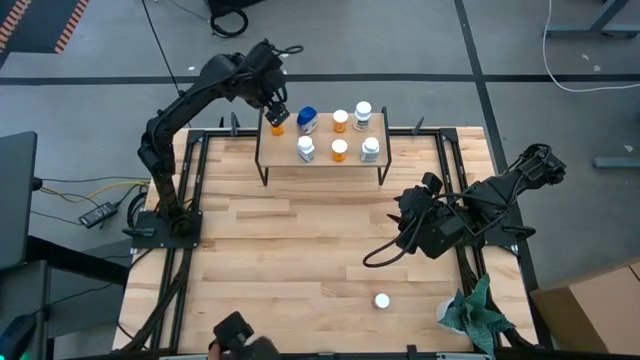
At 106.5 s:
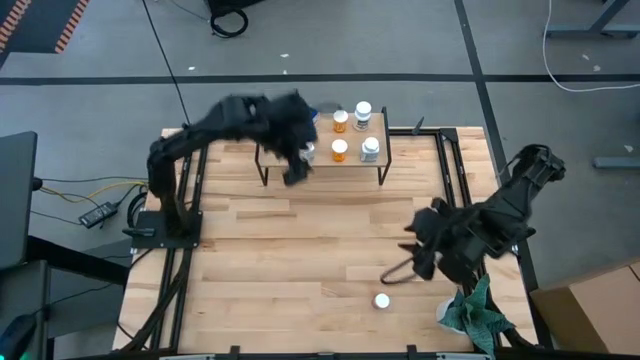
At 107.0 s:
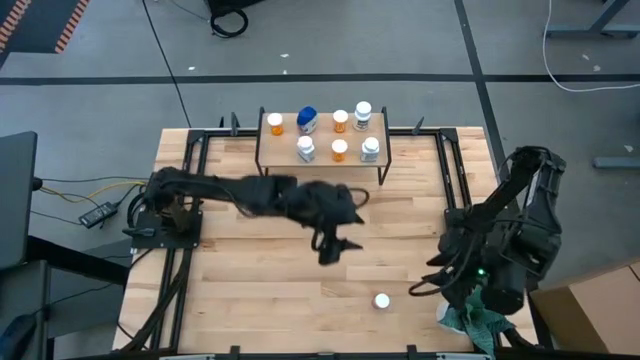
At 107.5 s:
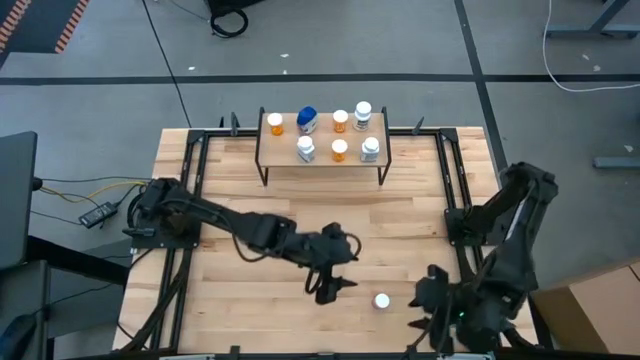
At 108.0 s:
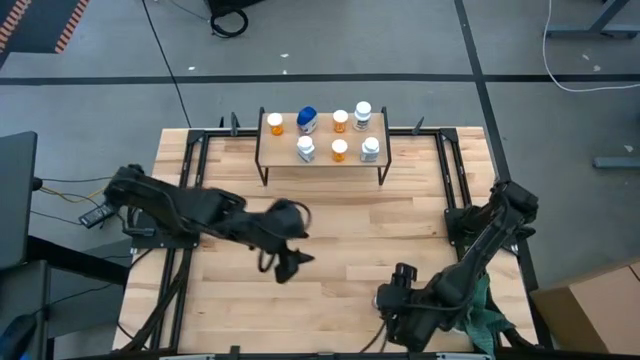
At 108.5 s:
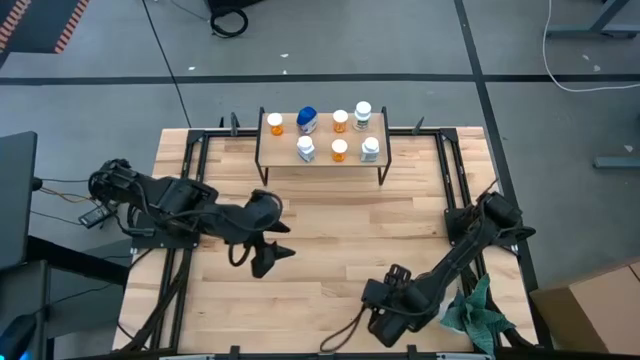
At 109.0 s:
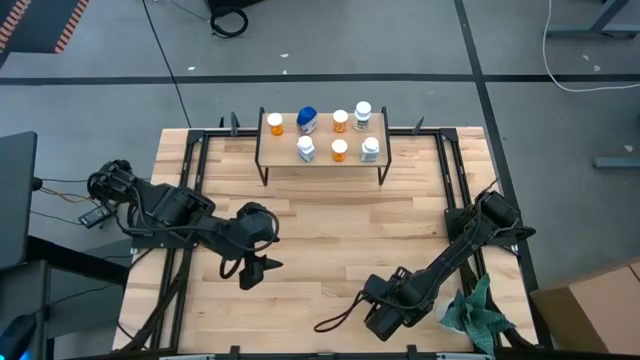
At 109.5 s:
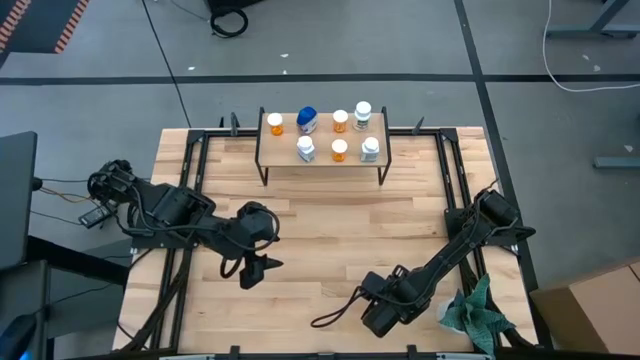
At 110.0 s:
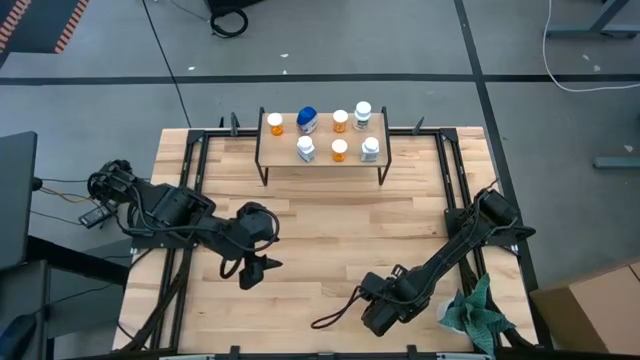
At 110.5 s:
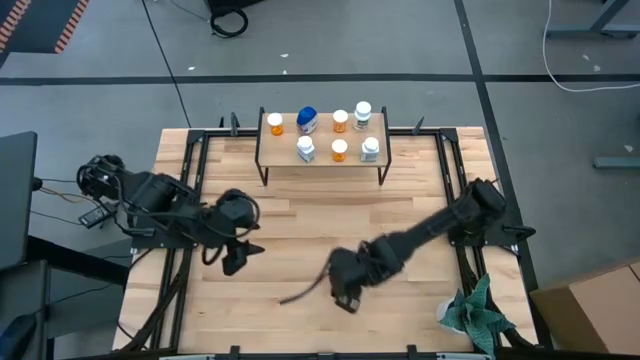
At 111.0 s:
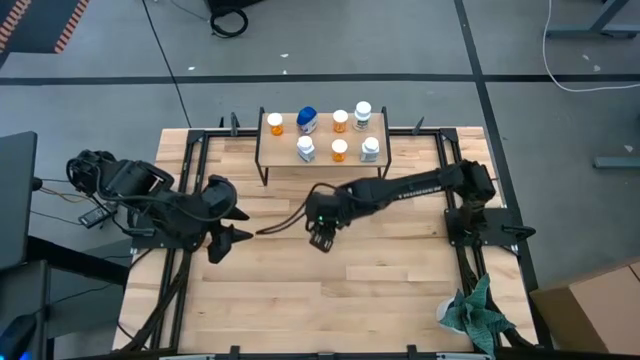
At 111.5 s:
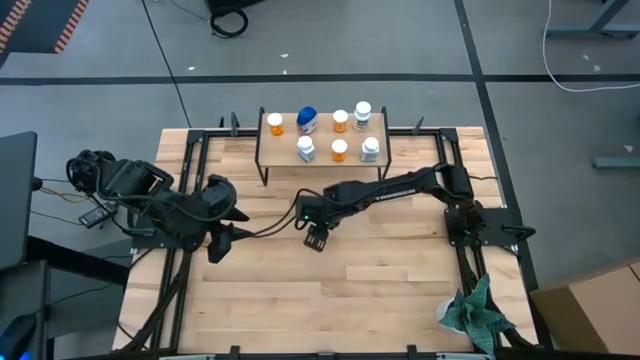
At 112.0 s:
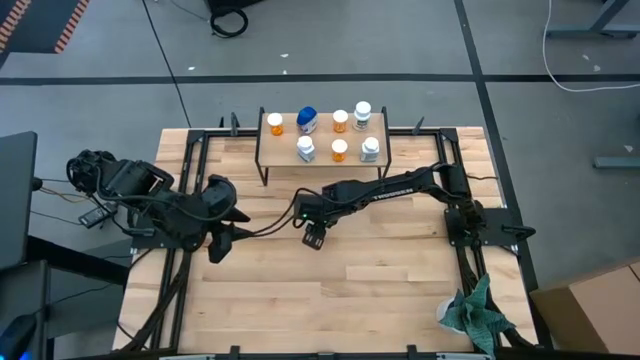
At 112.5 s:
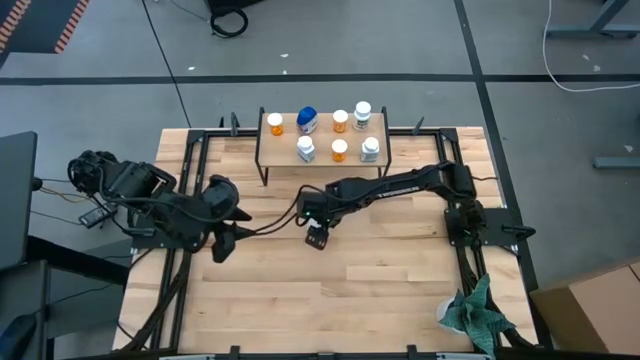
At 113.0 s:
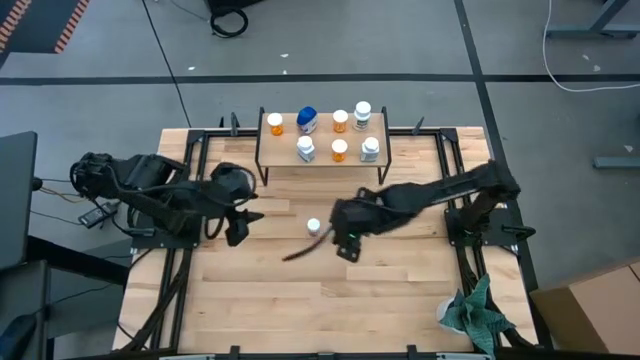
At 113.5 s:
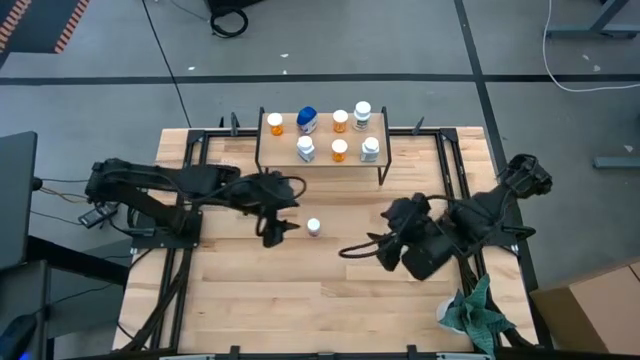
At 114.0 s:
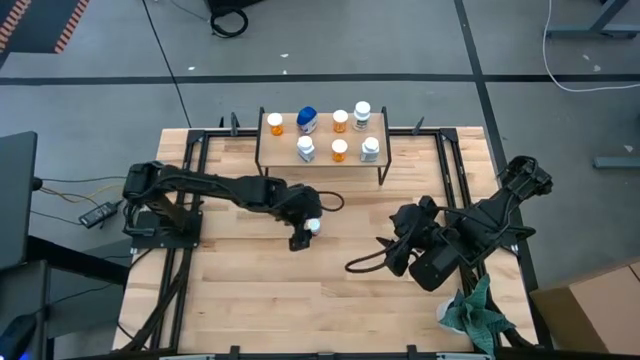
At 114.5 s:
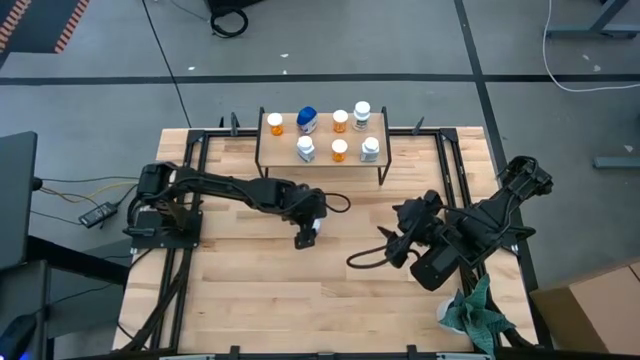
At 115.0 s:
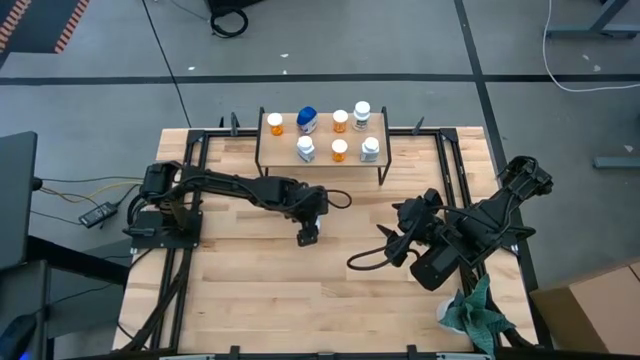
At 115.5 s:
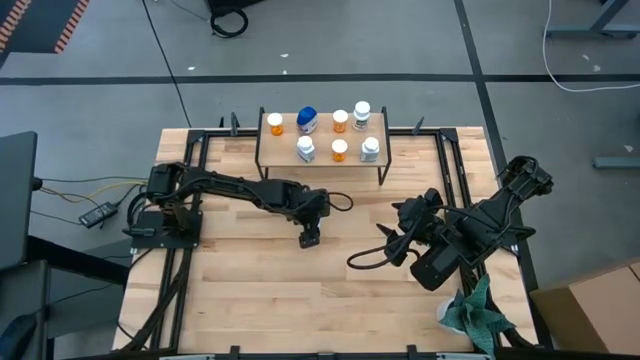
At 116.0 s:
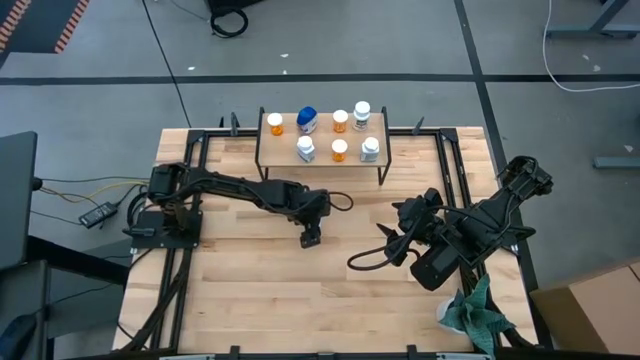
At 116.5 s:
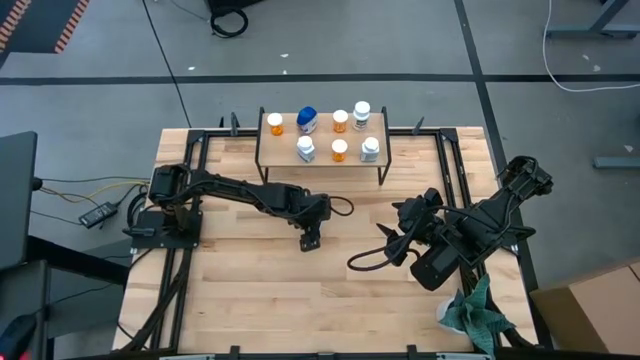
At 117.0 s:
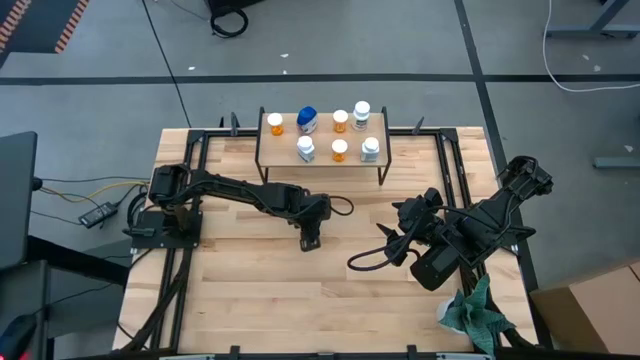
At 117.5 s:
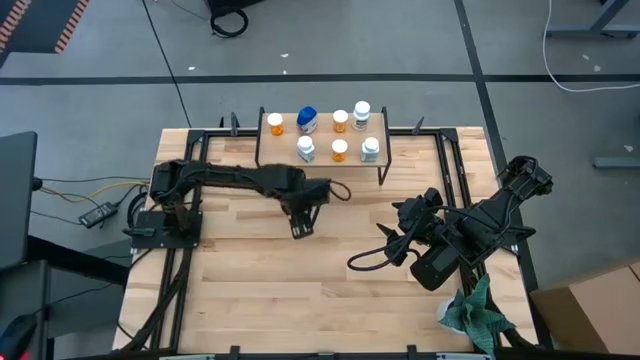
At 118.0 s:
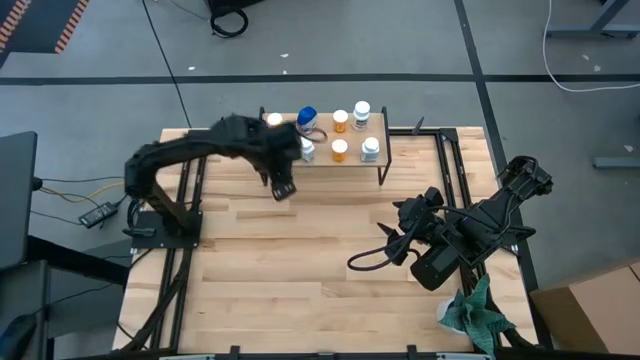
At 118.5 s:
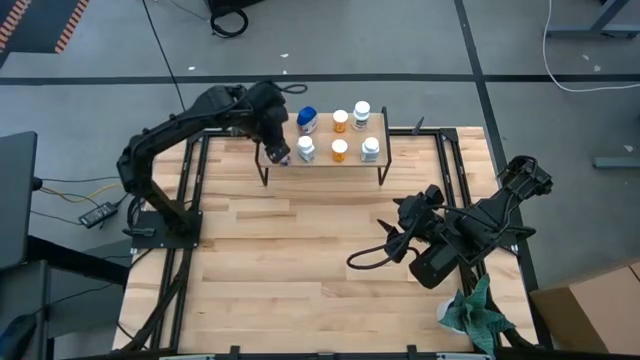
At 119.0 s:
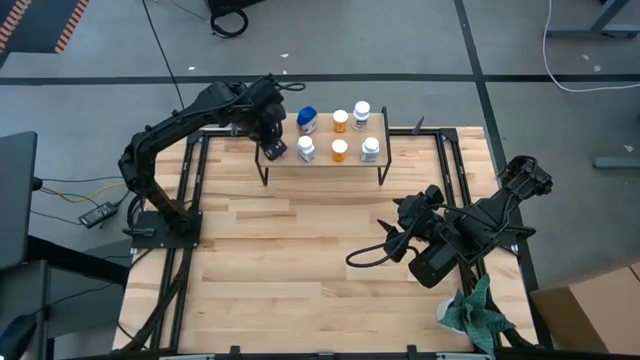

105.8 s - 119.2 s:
Task: Pick and place medicine bottles onto shelf by color
Put the pink medicine bottle on the shelf

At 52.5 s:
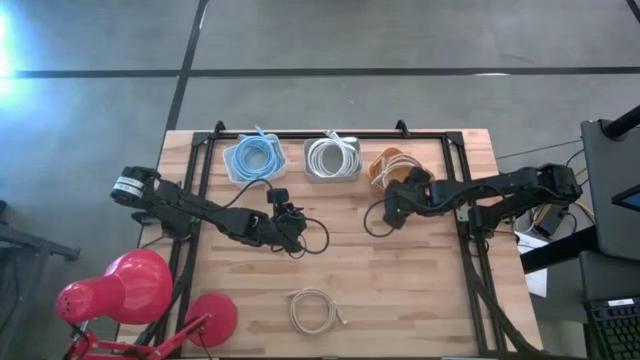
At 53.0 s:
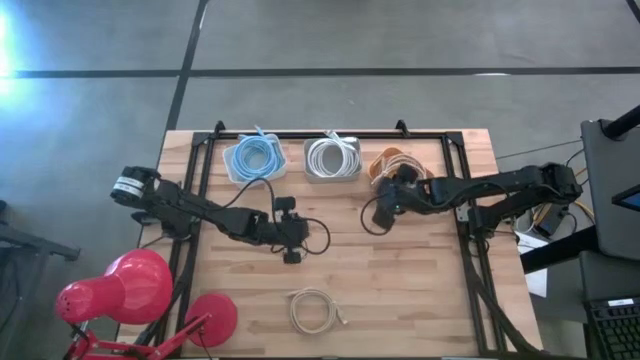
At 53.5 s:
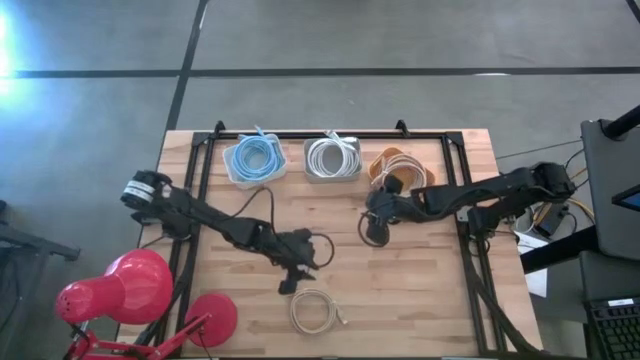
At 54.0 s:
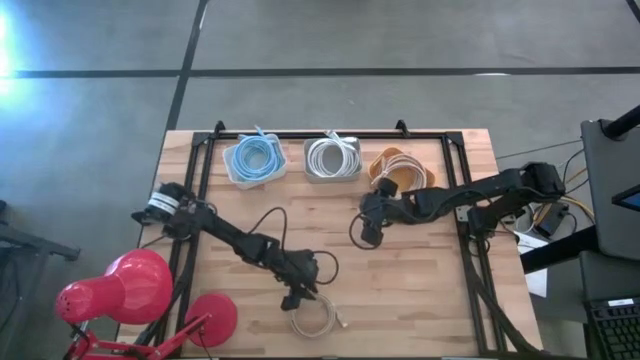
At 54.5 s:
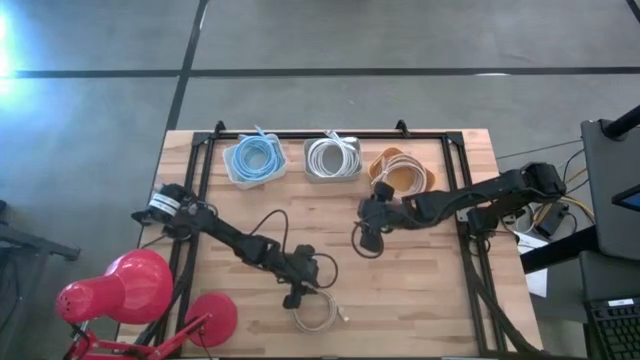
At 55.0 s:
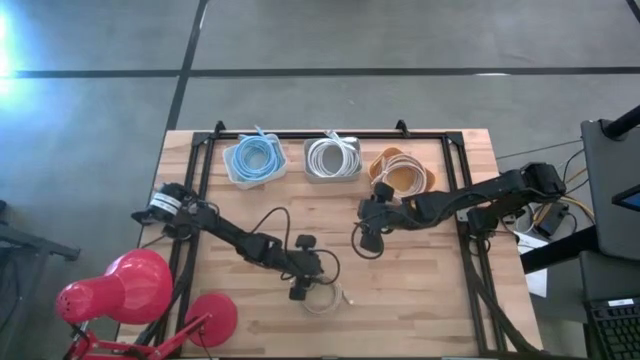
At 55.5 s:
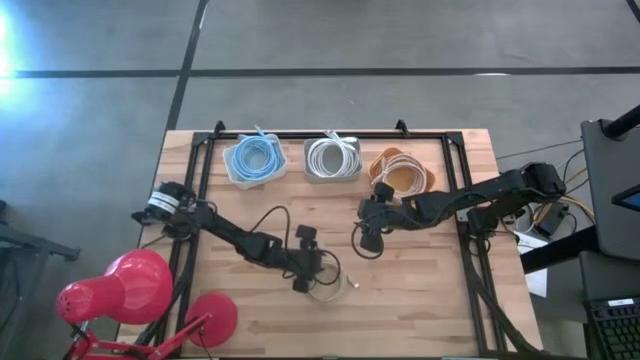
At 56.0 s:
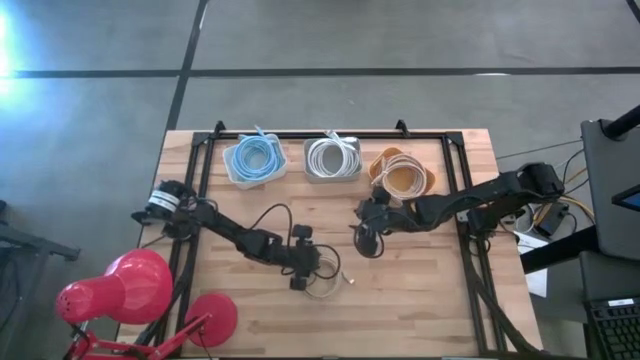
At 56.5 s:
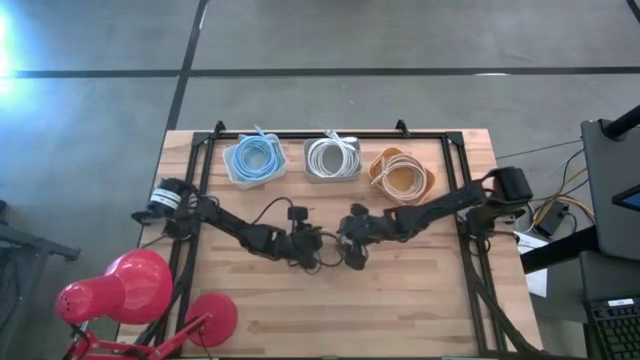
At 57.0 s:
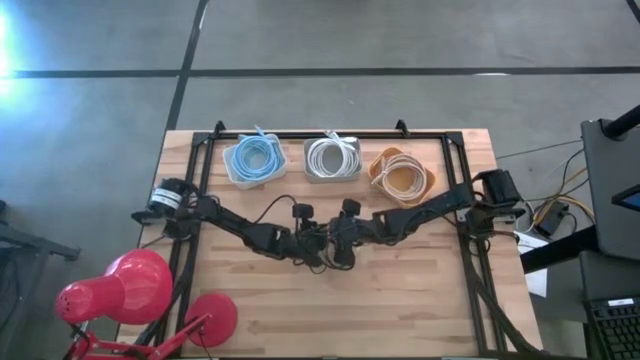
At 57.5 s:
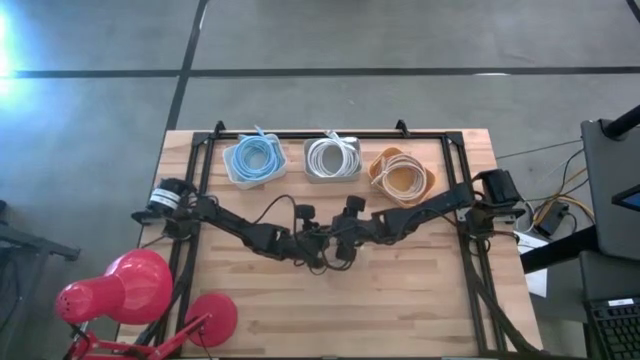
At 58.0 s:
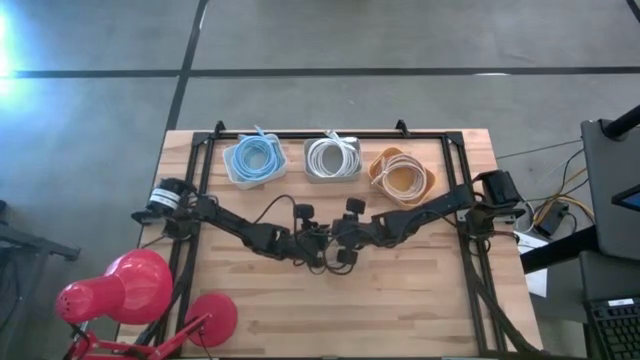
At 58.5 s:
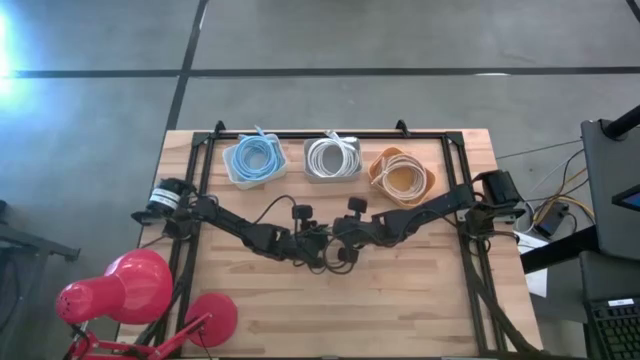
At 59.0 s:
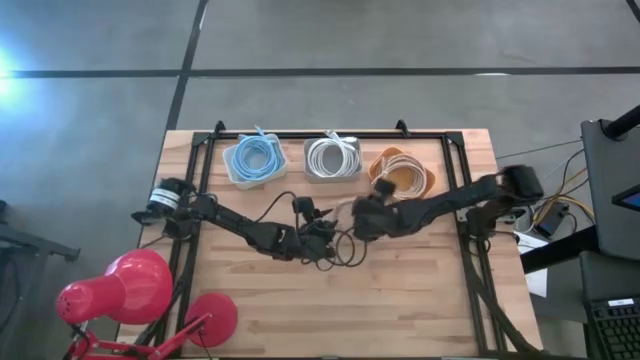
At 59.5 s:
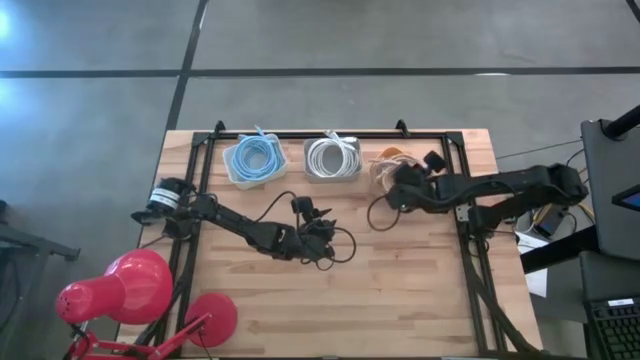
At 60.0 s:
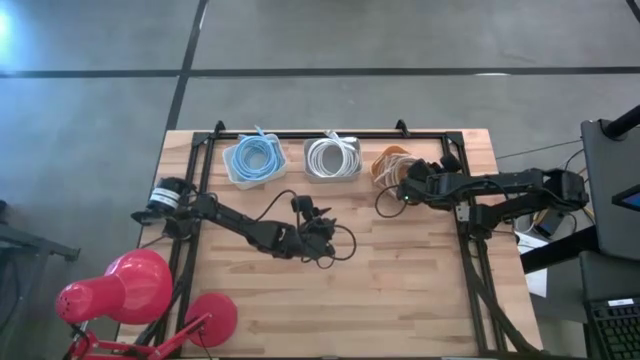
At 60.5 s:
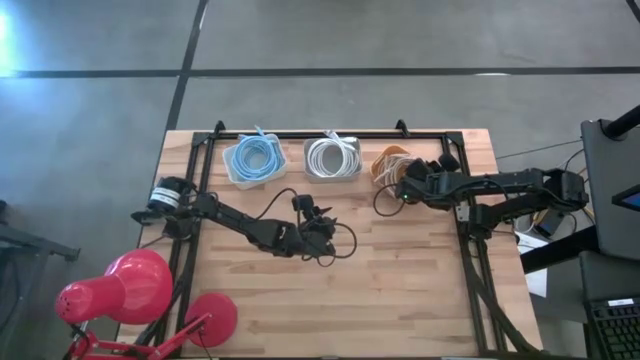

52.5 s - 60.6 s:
Task: Pick & Place USB Port
Put the brown cable into the yellow bin
